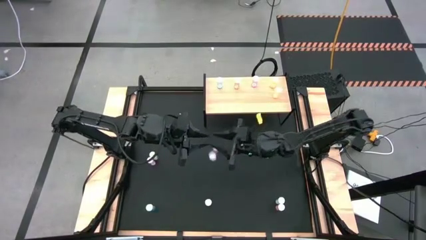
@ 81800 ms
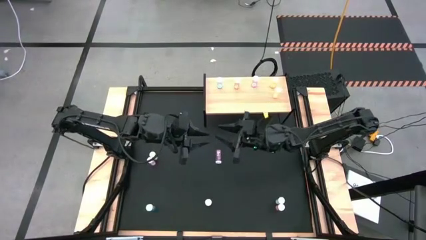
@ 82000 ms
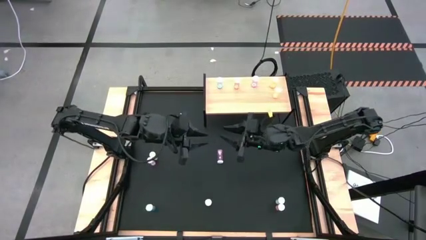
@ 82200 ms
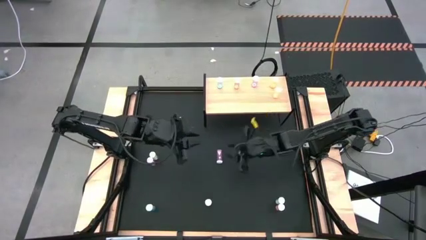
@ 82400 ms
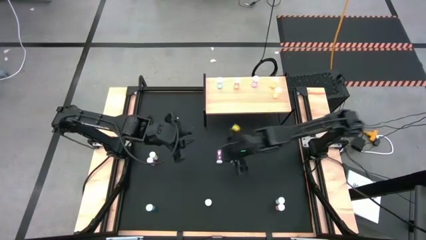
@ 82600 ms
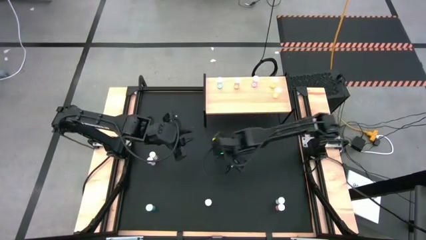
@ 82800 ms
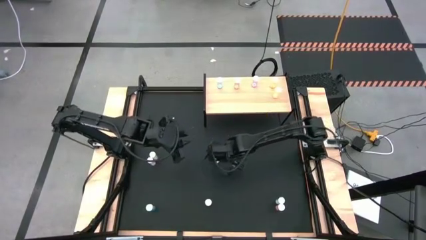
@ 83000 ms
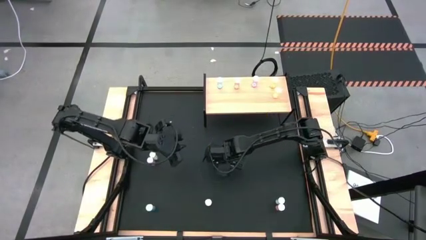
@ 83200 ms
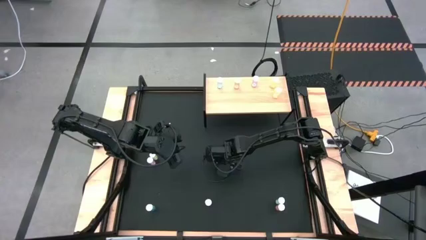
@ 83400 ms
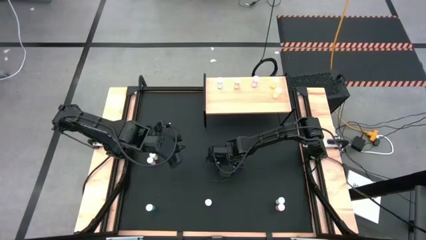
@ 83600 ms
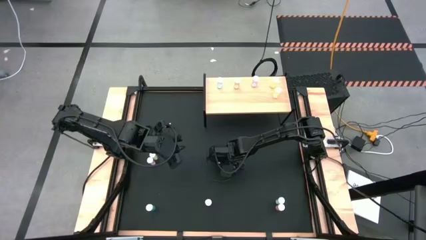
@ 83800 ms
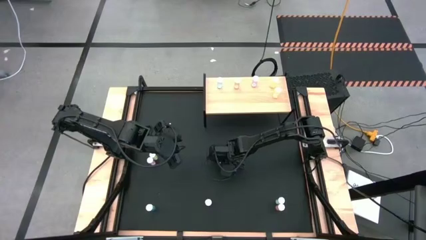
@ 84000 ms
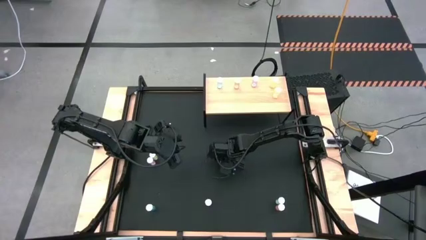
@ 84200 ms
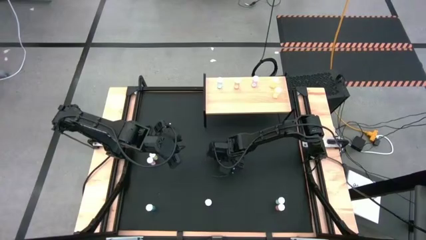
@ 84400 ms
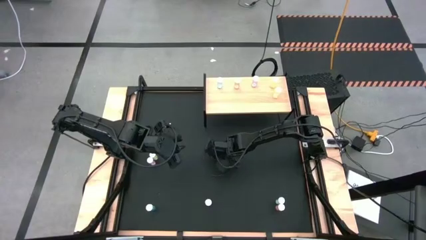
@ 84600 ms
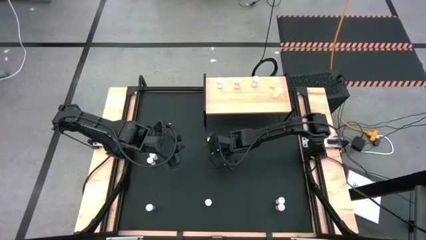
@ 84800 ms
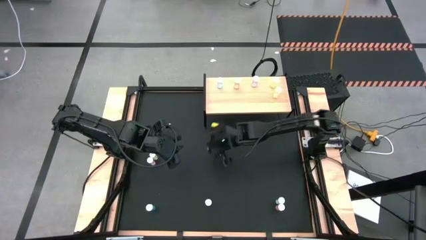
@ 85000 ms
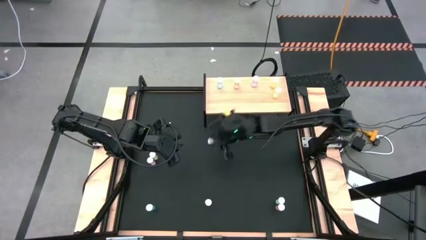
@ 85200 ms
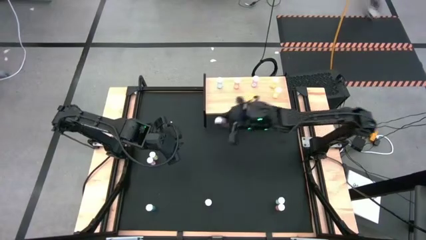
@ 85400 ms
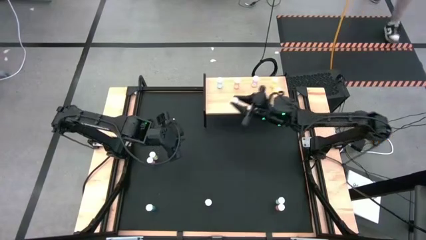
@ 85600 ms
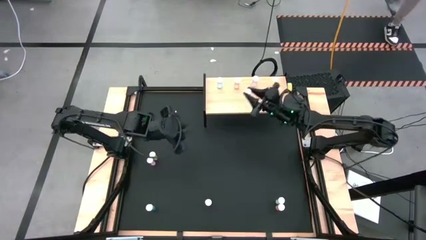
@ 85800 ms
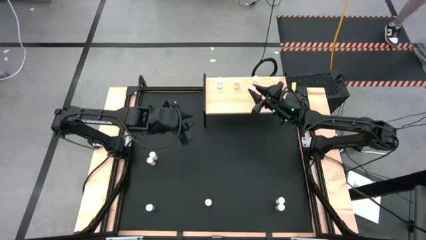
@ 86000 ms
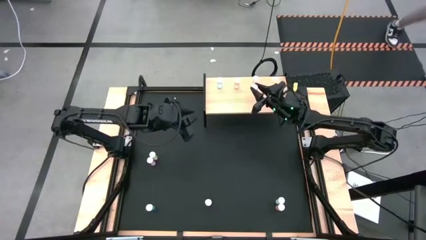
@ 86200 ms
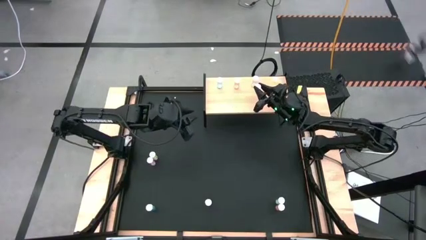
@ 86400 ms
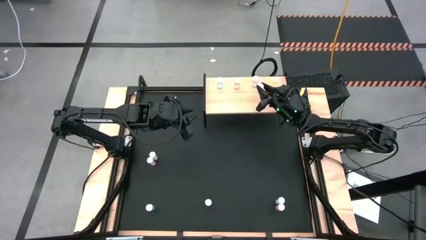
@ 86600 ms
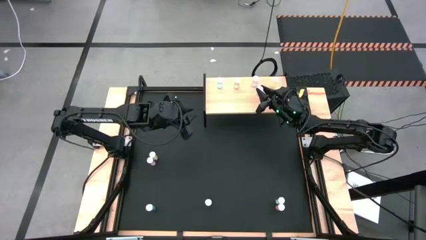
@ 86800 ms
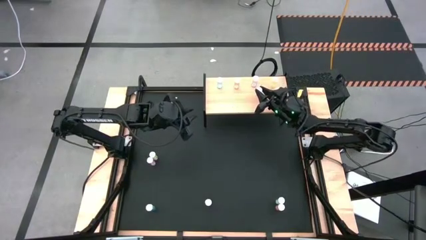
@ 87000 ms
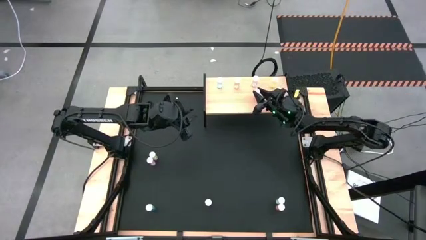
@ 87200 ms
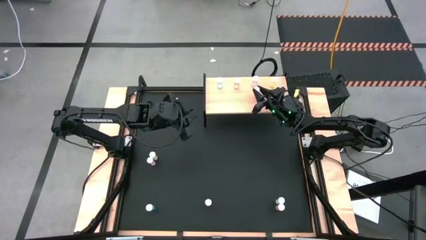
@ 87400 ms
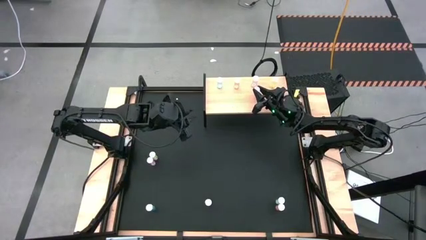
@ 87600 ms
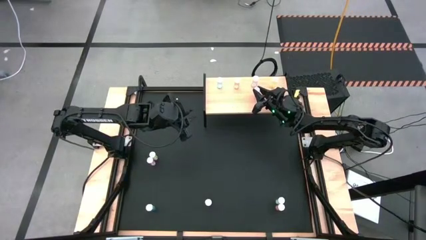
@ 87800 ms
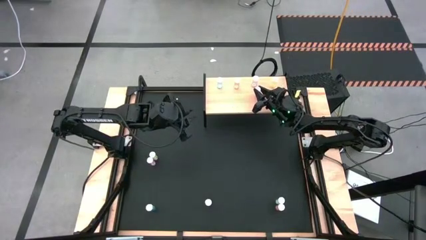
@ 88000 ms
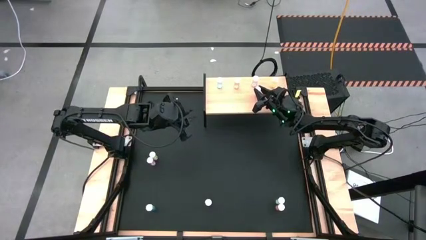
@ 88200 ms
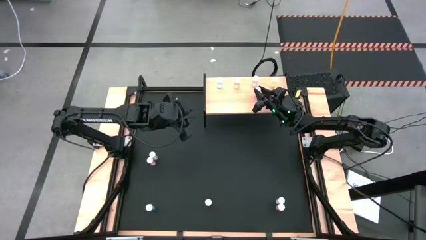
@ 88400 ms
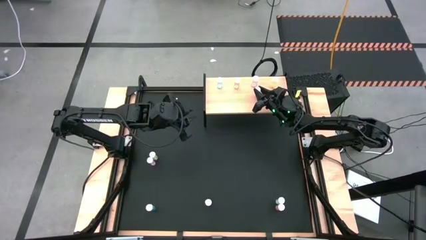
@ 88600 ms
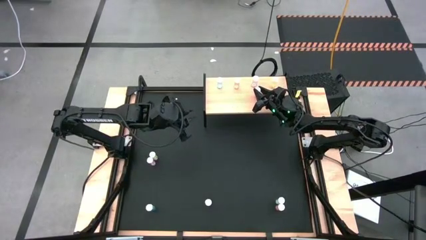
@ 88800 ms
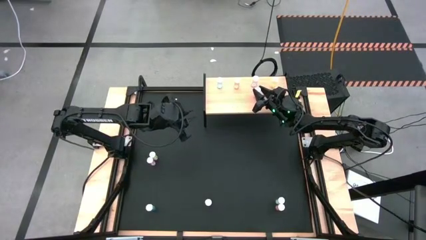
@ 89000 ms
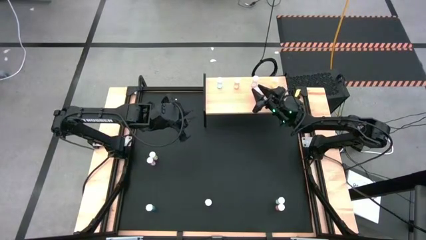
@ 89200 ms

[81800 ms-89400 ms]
Task: Pick and place medicine bottles onto shelf by color
Put the right pink pill bottle on the shelf aligned with the other pink pill bottle

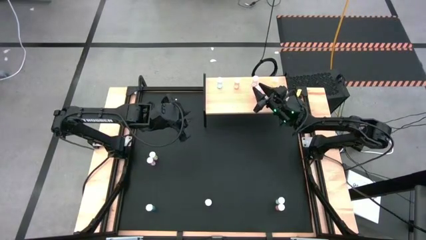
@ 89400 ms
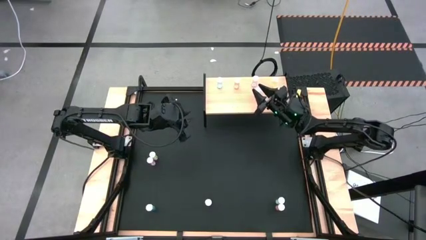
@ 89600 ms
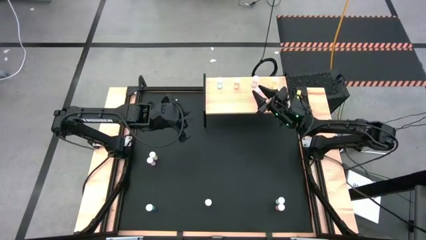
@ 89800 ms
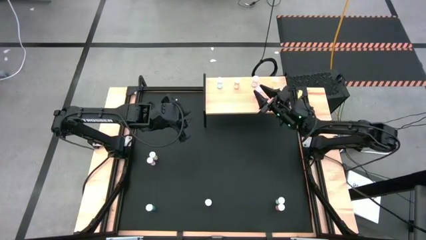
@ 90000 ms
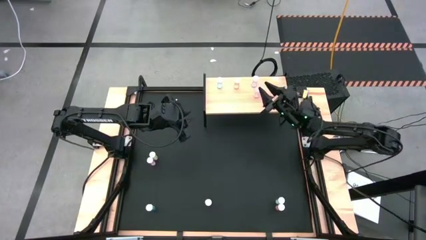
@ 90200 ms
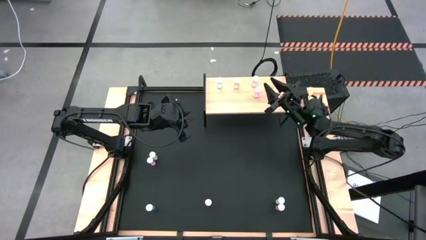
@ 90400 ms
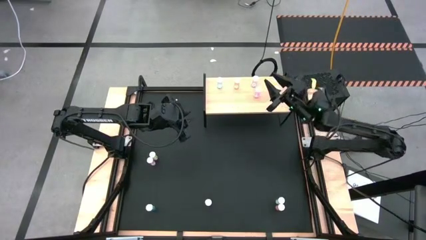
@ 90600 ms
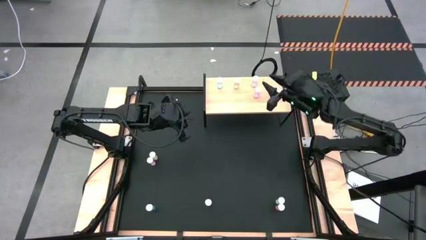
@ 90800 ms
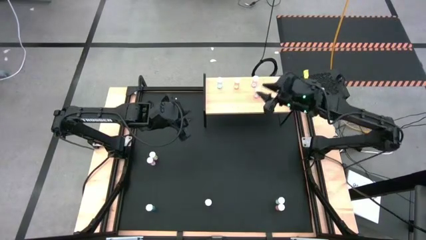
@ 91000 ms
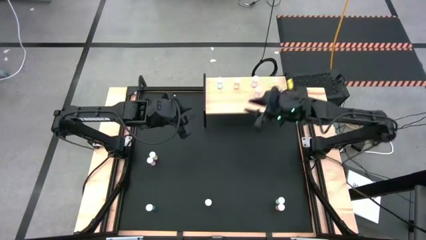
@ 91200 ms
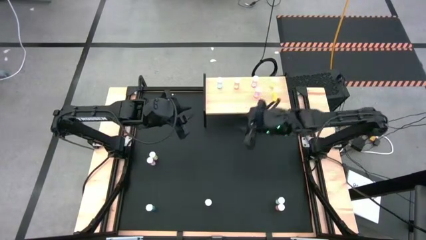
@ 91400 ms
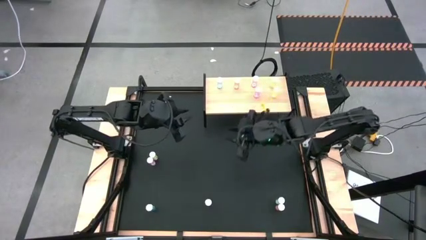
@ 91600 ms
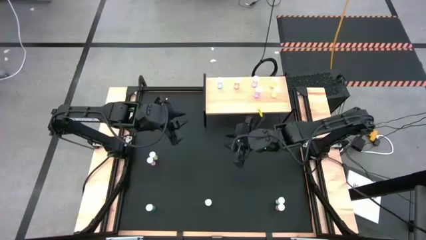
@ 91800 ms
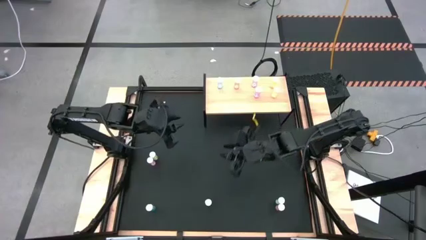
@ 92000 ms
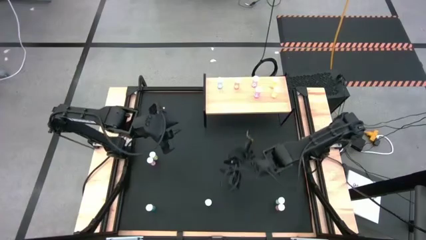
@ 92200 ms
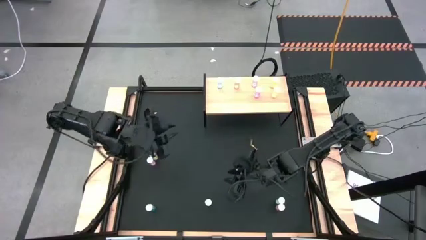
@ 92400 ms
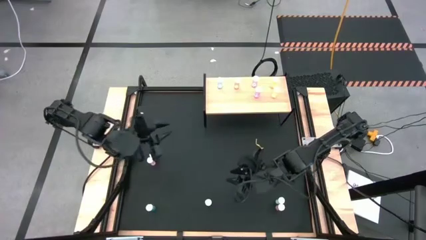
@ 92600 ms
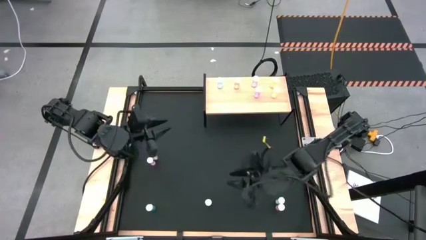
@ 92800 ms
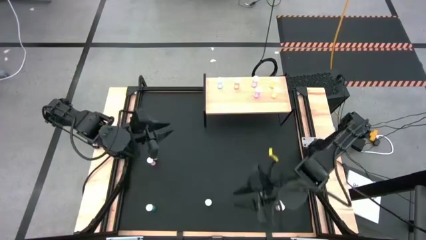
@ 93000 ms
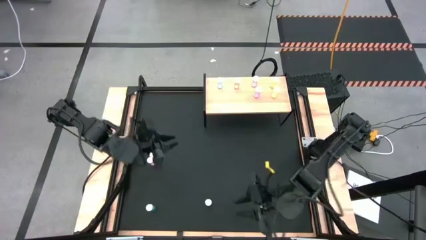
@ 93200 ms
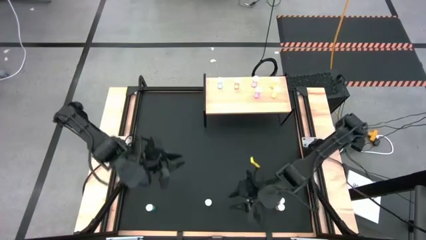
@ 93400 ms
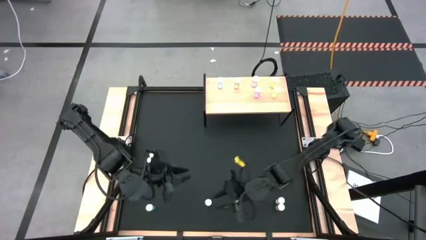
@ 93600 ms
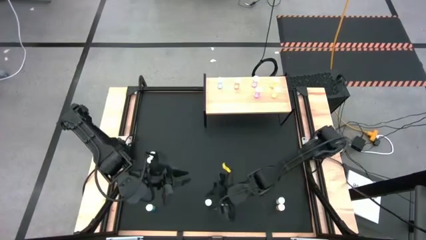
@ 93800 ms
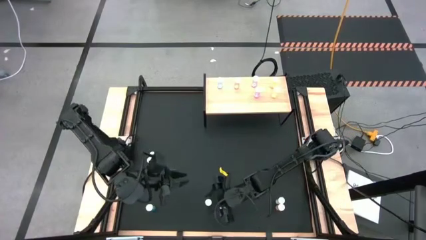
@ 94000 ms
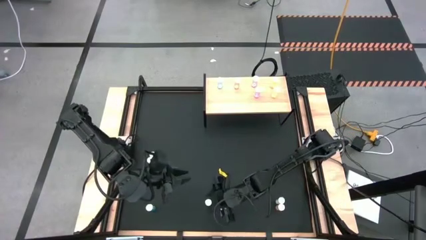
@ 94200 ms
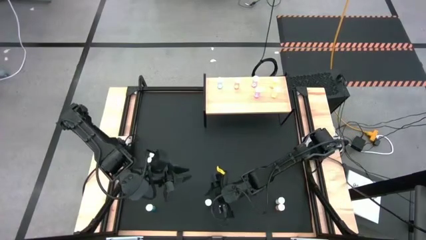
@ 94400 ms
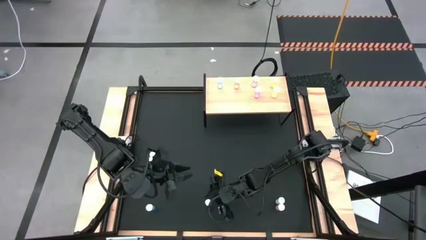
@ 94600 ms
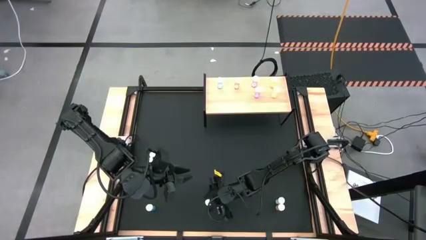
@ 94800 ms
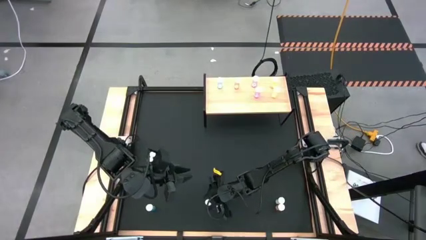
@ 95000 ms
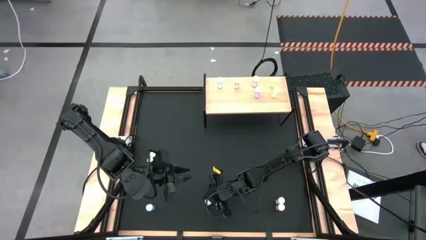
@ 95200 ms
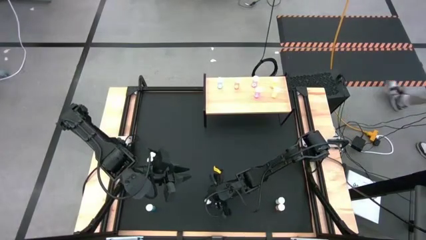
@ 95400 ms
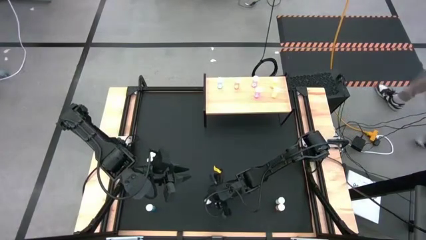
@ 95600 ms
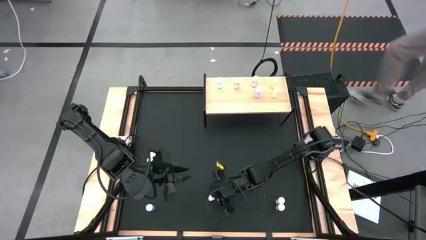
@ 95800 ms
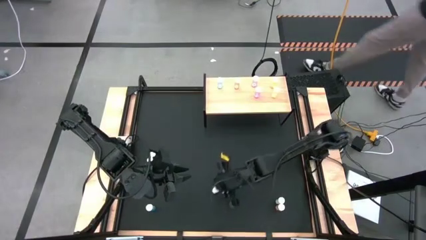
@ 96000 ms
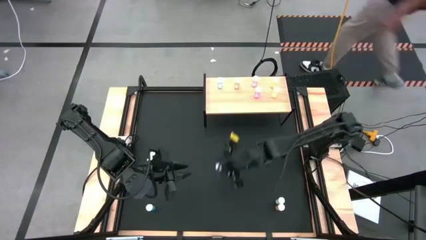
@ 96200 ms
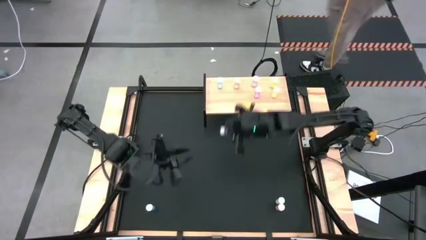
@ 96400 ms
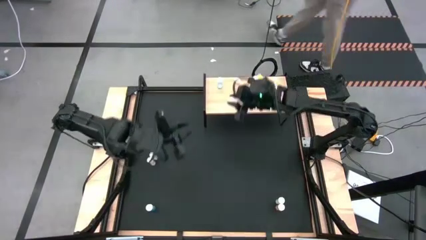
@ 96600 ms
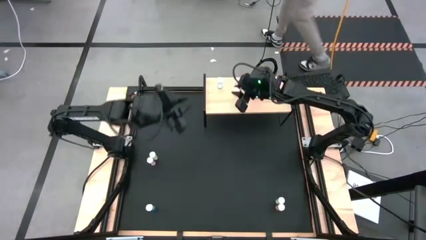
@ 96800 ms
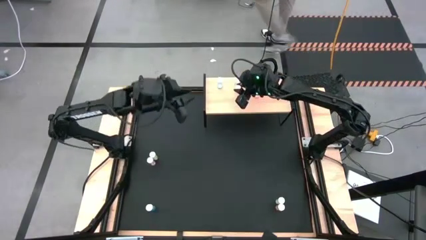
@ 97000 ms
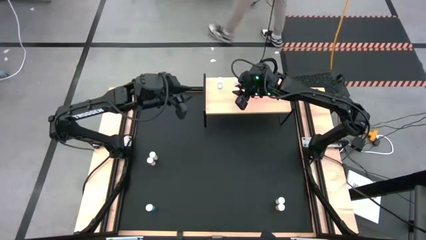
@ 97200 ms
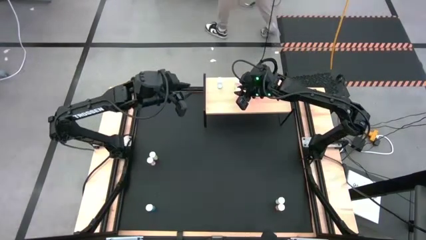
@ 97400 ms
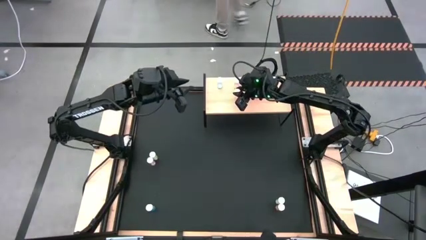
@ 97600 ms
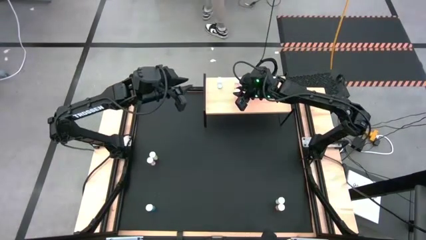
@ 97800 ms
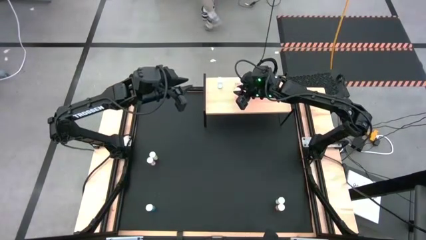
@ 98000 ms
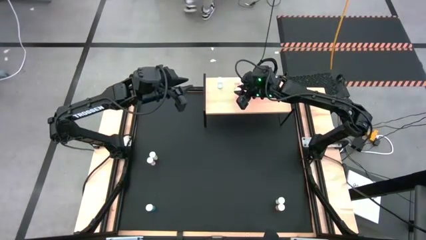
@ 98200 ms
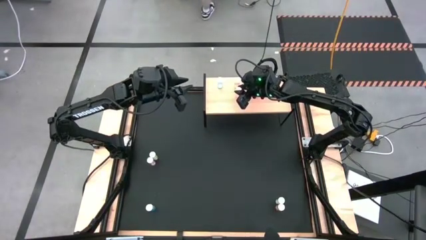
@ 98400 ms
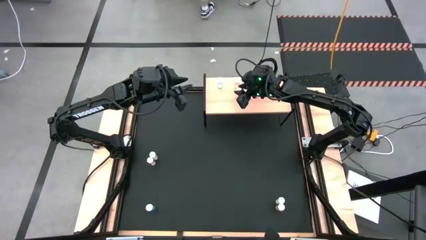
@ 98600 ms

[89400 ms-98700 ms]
Put the left orange pill bottle on the shelf aligned with the other orange pill bottle
